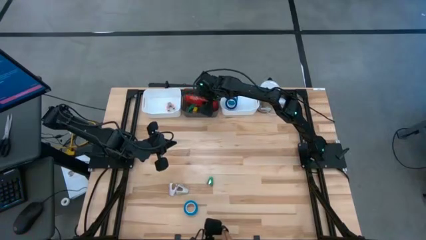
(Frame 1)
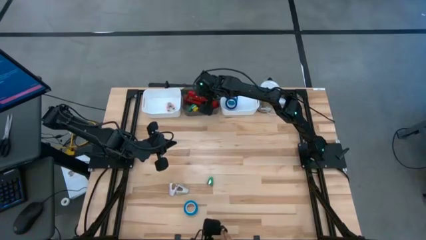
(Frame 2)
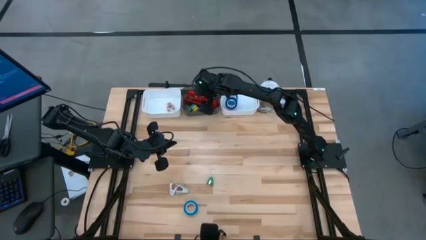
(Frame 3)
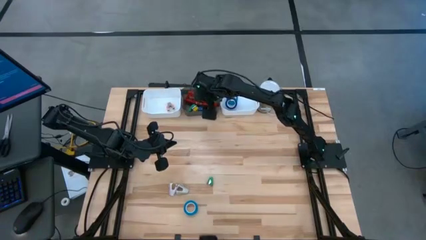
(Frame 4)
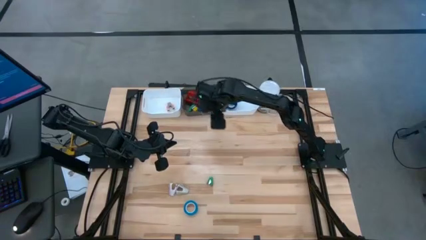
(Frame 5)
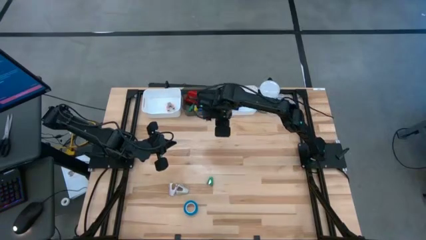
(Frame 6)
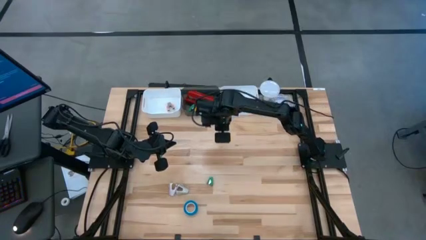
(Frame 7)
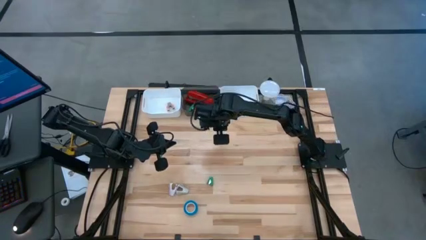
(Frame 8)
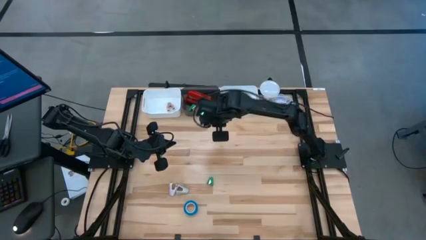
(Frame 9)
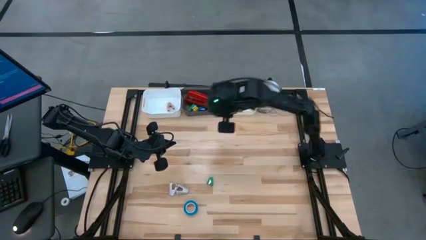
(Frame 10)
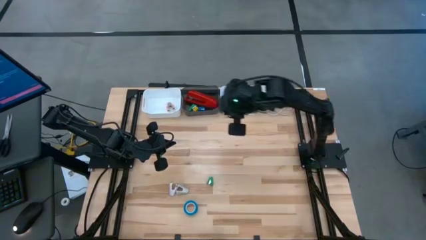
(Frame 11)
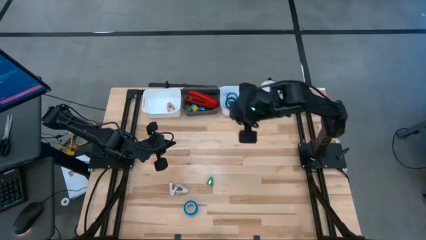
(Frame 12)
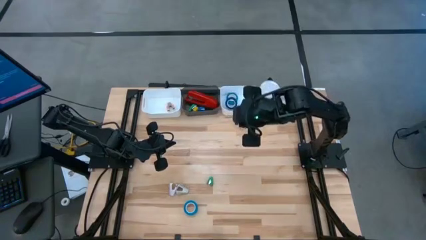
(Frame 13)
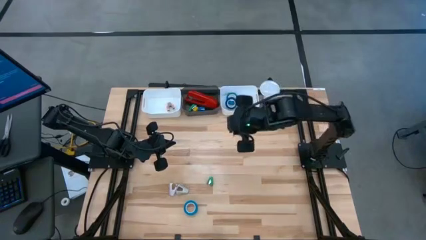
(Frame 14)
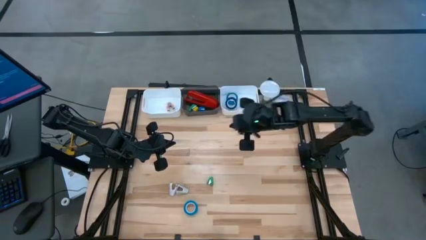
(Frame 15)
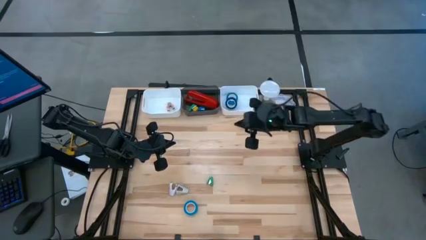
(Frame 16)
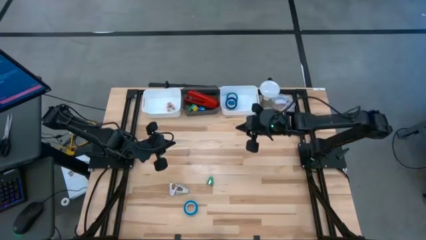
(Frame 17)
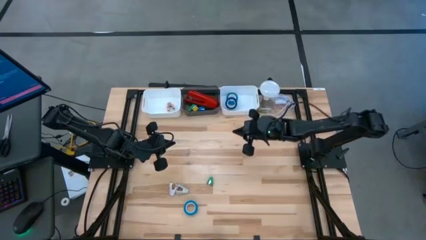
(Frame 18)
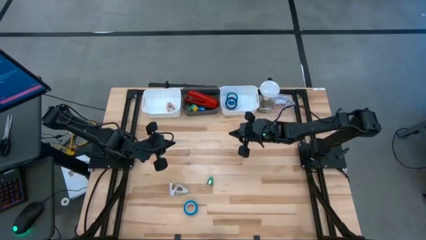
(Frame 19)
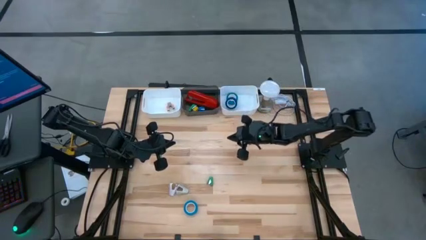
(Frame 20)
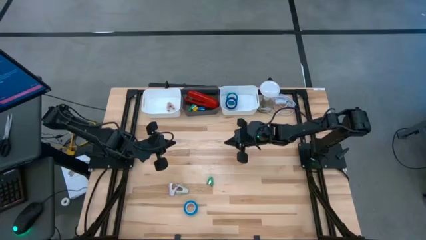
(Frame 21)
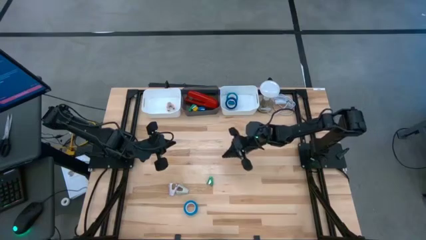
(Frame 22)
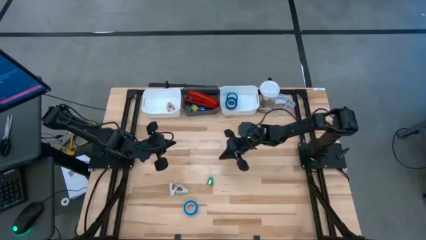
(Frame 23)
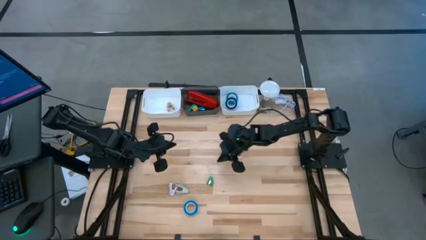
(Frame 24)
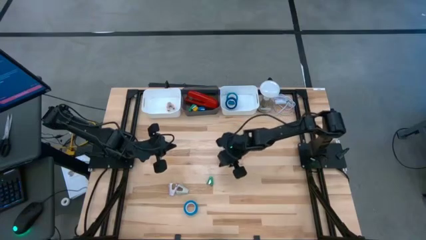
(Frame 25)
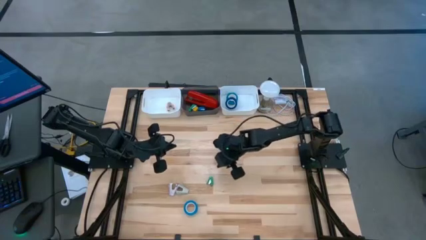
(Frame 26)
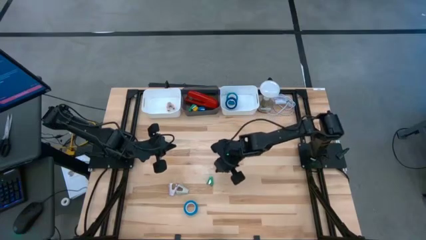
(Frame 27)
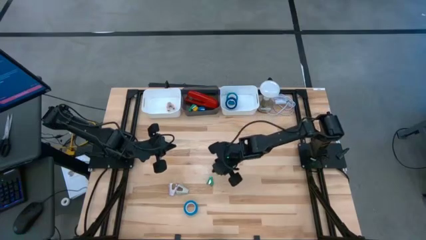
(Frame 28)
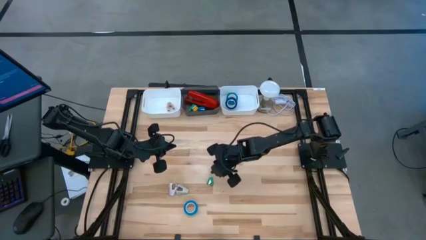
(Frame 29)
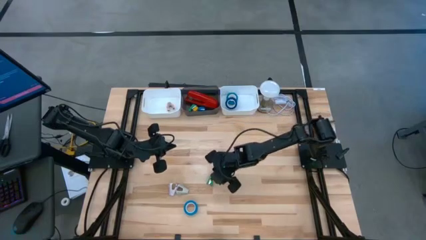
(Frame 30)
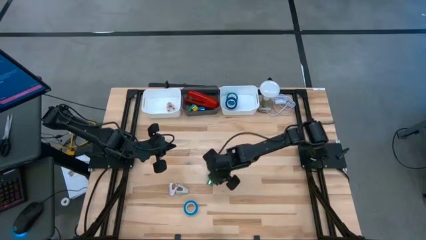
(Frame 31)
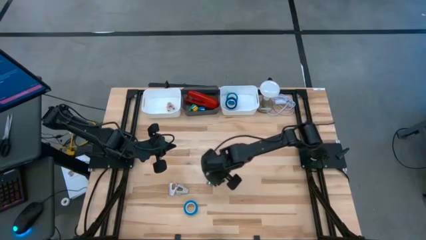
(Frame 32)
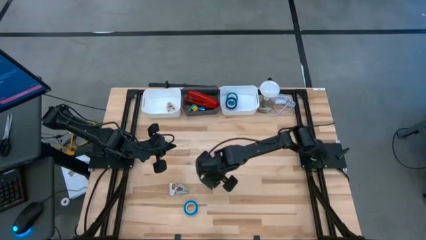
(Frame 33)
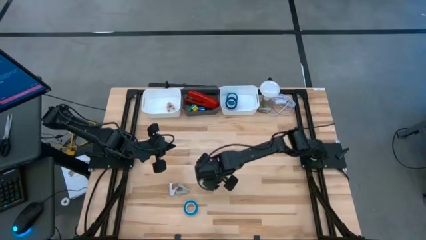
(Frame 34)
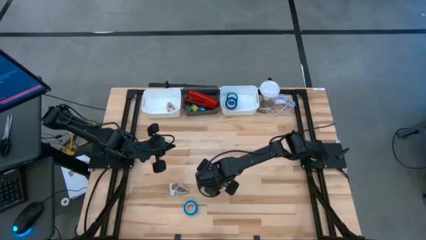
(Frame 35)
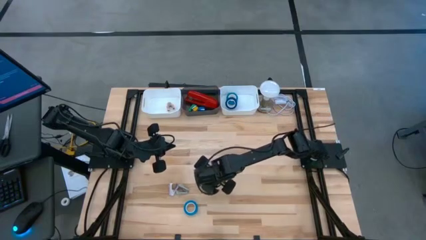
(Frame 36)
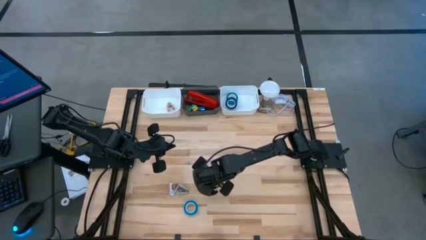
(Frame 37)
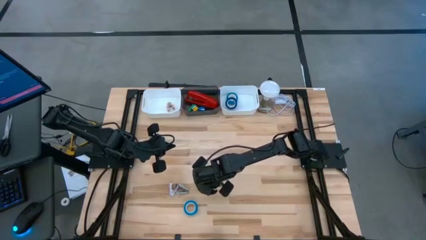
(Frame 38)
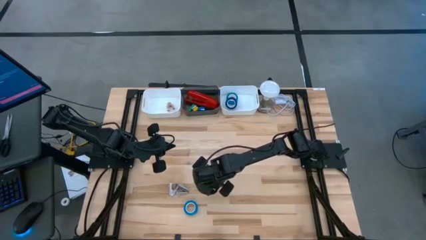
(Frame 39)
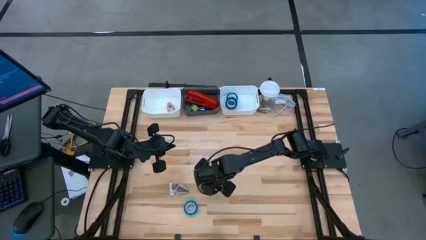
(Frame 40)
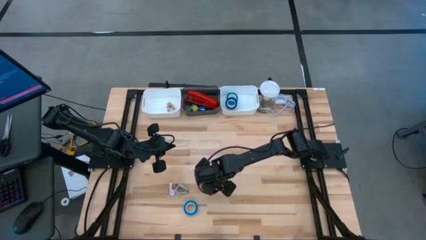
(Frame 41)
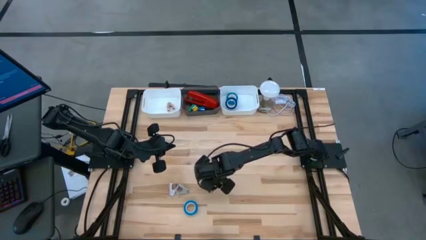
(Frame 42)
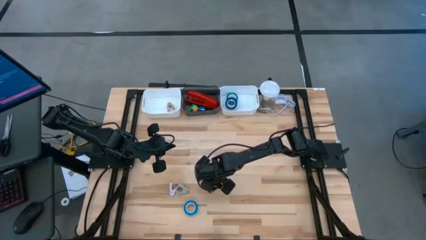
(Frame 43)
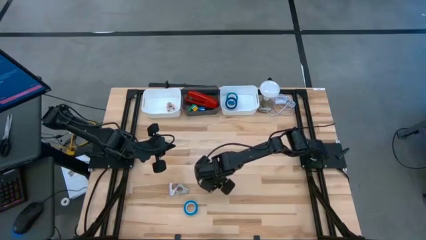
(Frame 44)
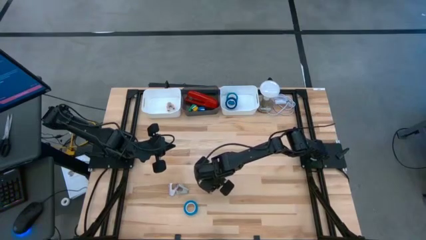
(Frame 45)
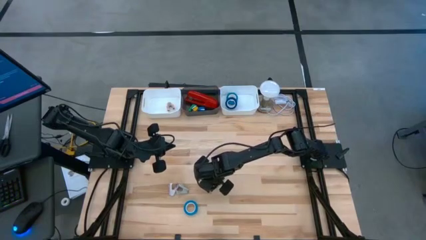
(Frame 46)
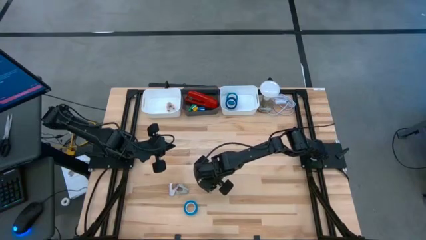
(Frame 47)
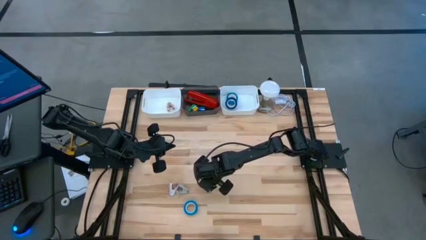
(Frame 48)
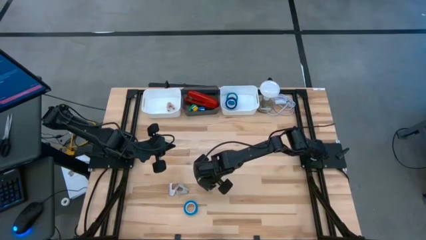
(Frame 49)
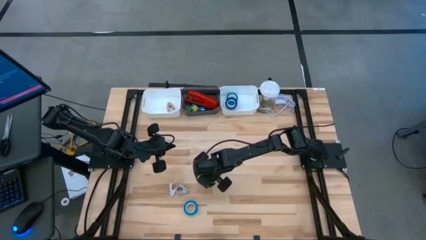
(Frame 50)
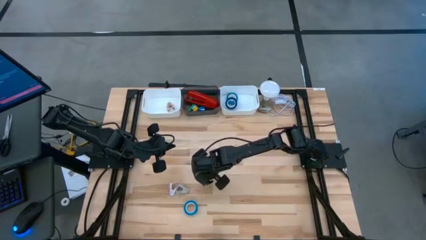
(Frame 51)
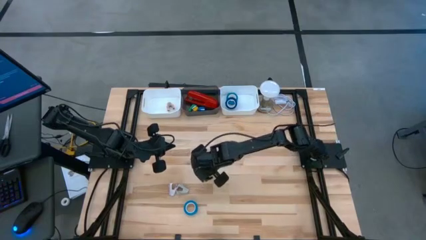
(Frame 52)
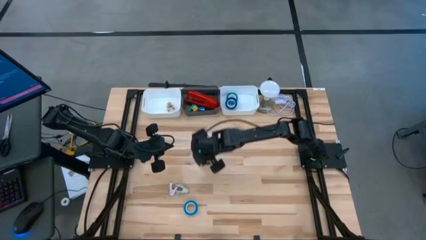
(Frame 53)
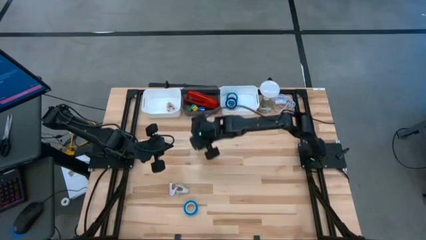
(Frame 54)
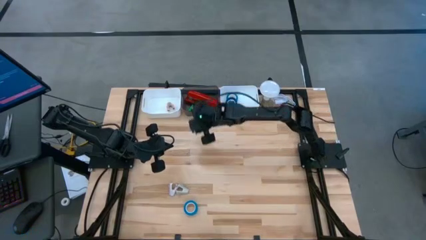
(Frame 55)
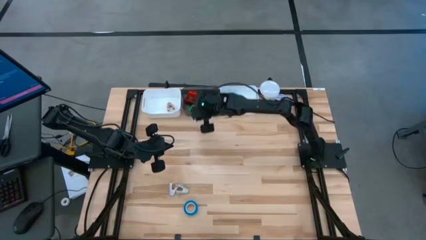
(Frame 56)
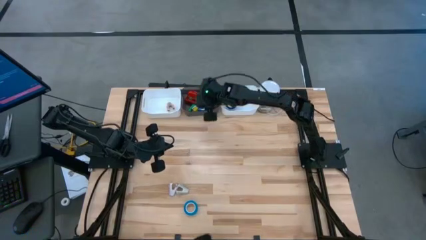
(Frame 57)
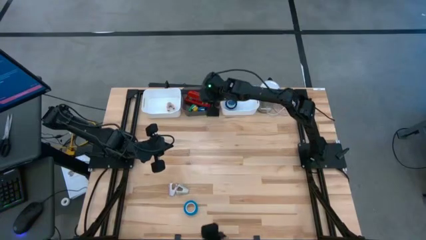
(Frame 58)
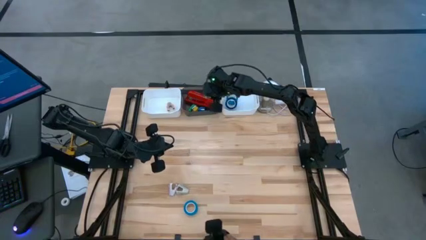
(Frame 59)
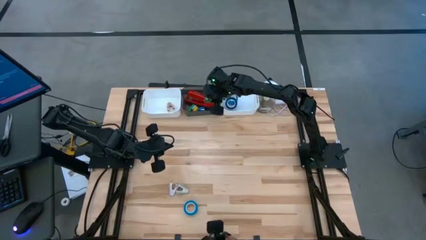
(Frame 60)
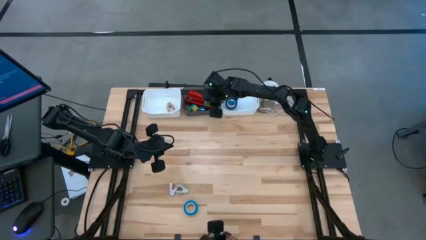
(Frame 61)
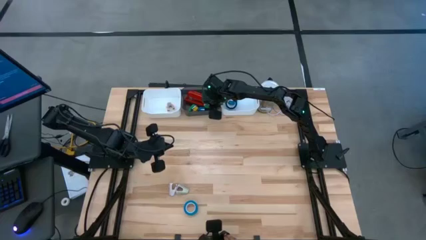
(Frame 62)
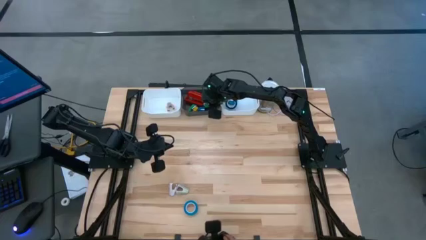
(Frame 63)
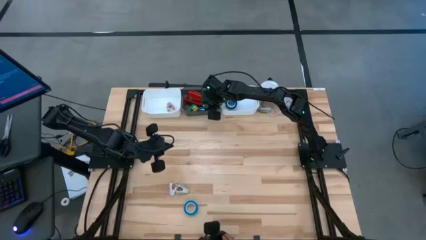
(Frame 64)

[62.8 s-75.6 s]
Task: Pick and place Stapler, Stapler remover, tape
Put the green stapler into the black bin
